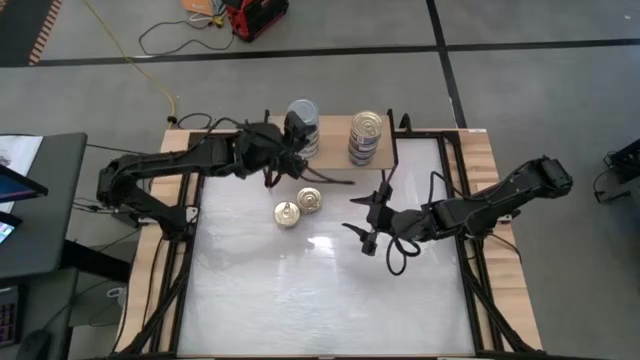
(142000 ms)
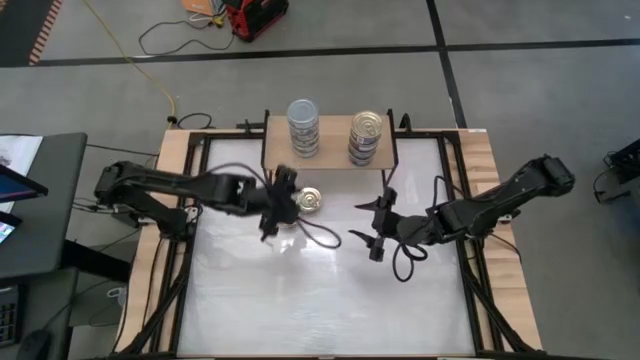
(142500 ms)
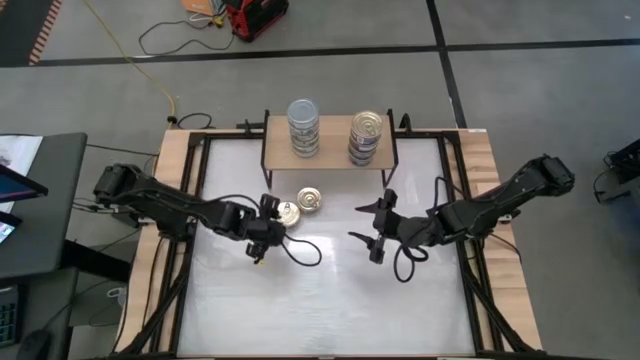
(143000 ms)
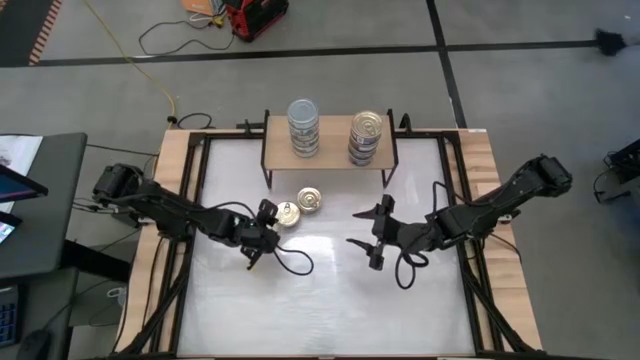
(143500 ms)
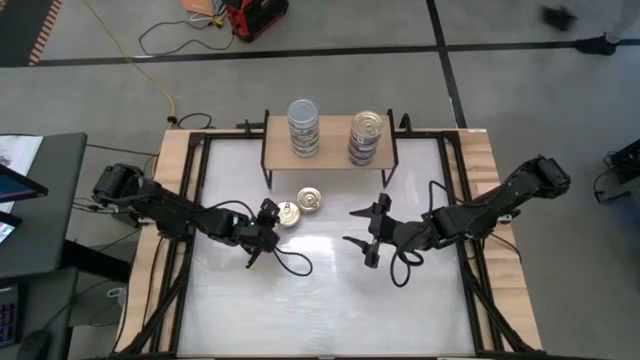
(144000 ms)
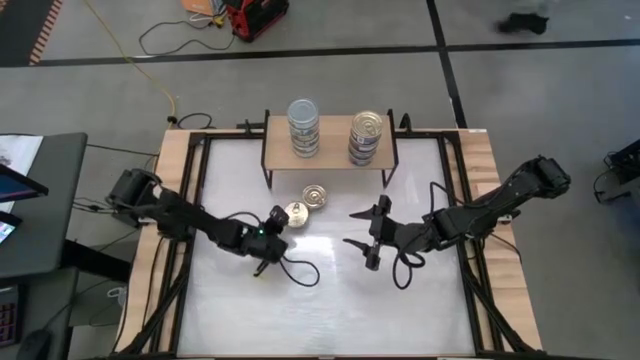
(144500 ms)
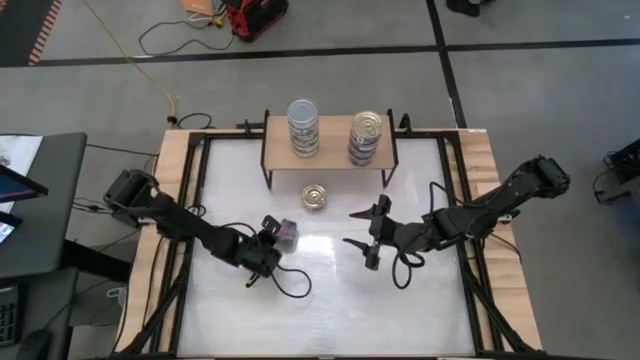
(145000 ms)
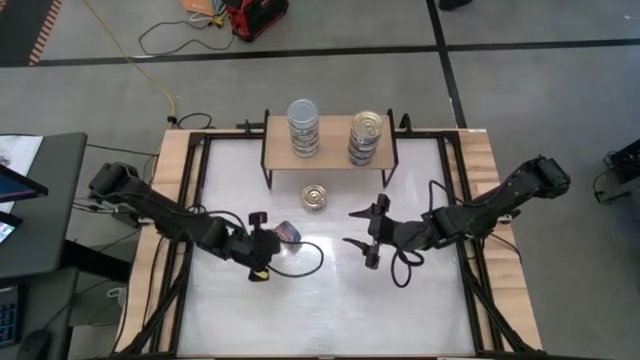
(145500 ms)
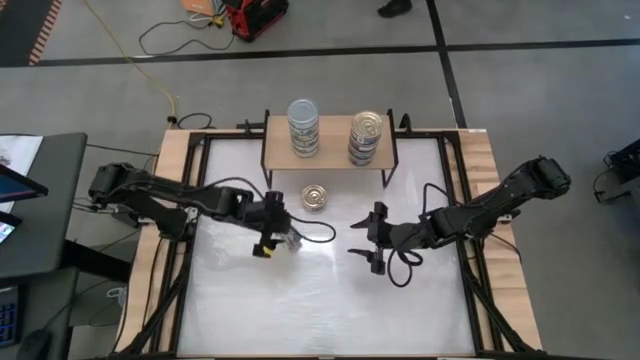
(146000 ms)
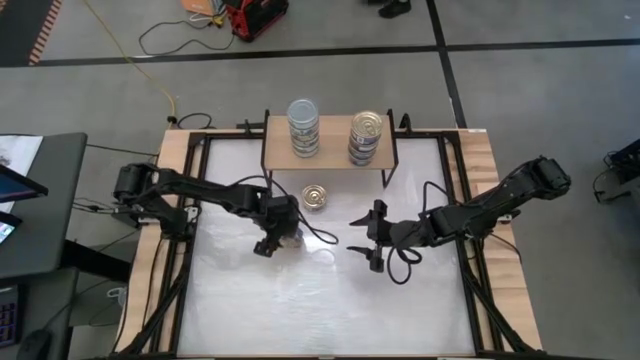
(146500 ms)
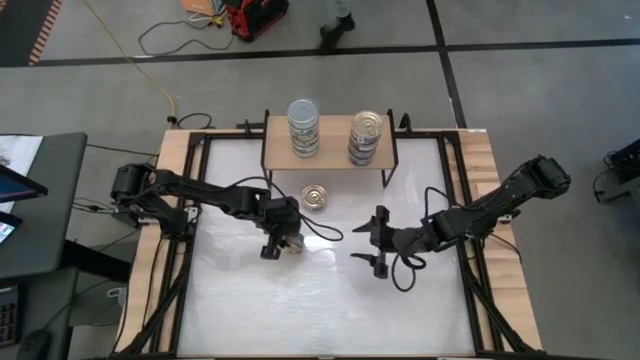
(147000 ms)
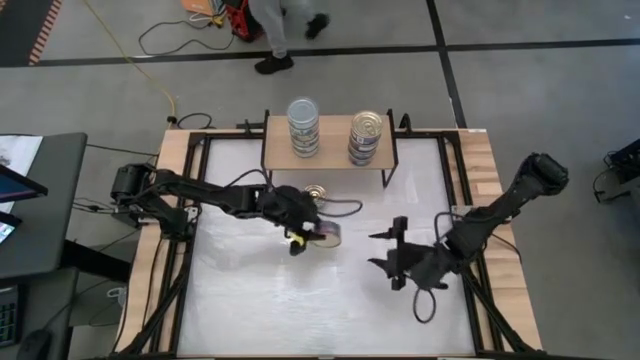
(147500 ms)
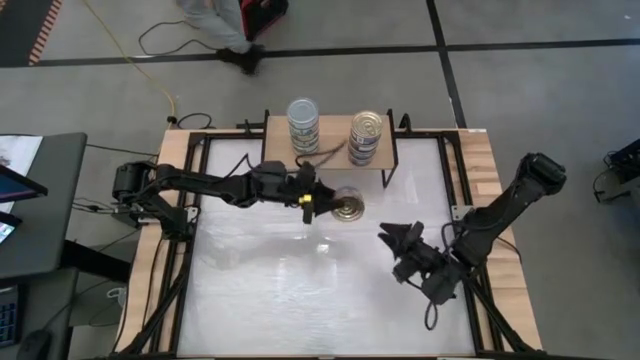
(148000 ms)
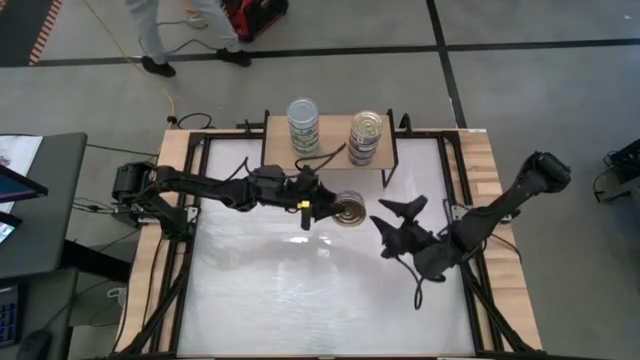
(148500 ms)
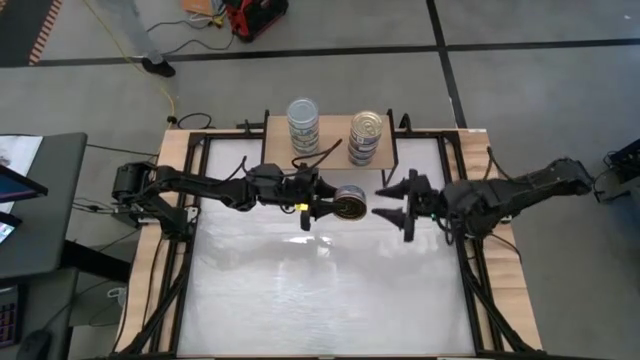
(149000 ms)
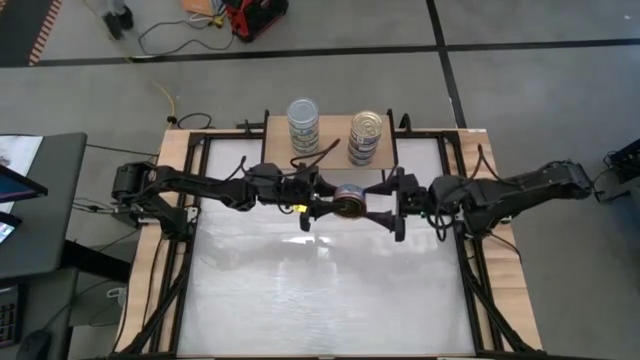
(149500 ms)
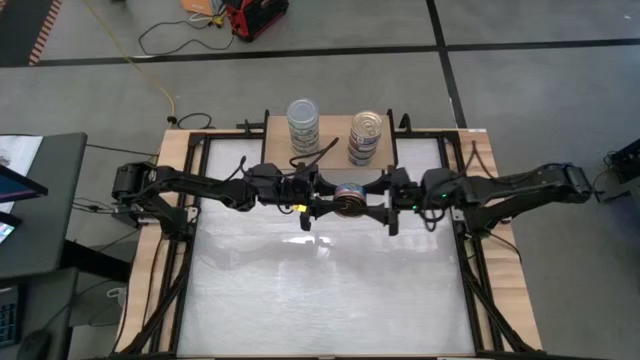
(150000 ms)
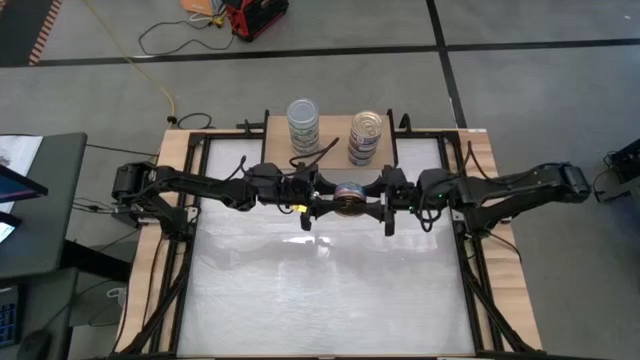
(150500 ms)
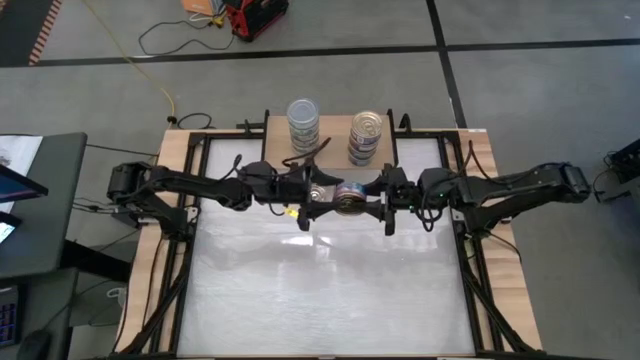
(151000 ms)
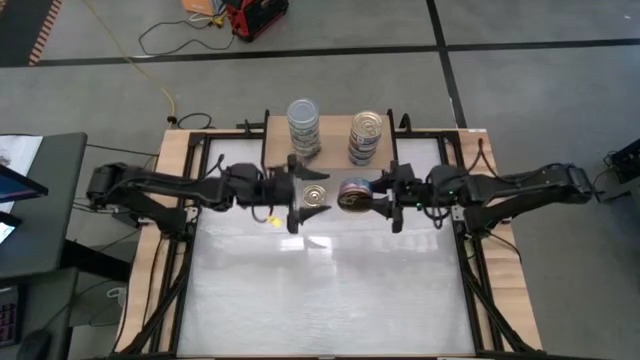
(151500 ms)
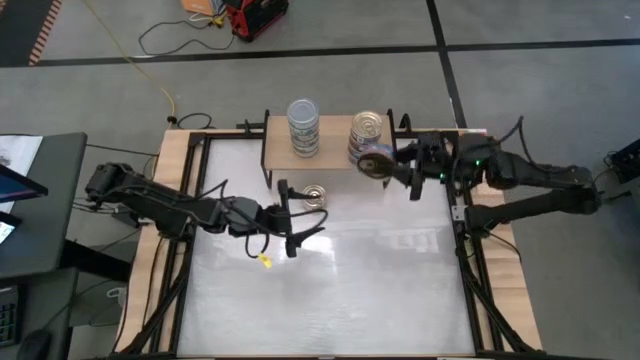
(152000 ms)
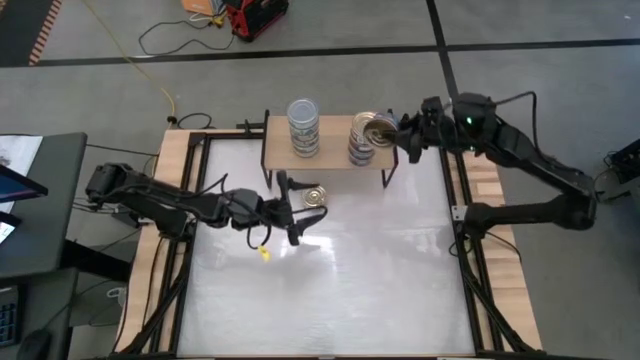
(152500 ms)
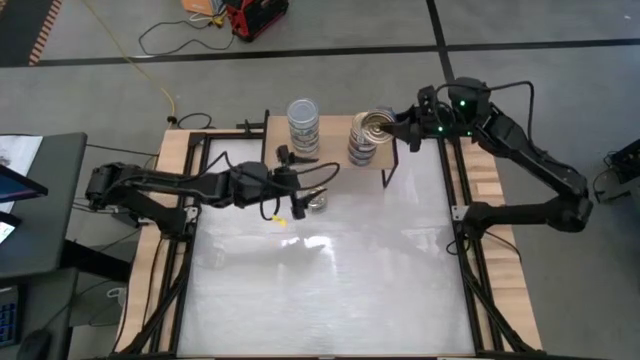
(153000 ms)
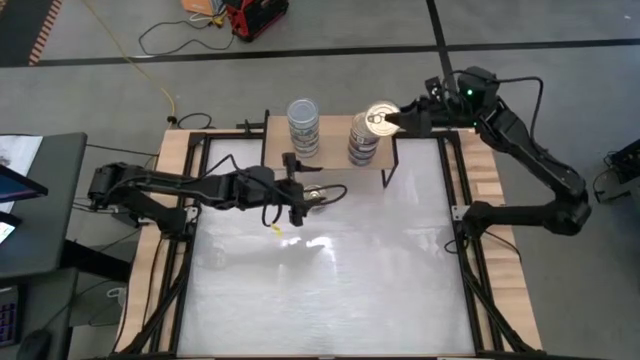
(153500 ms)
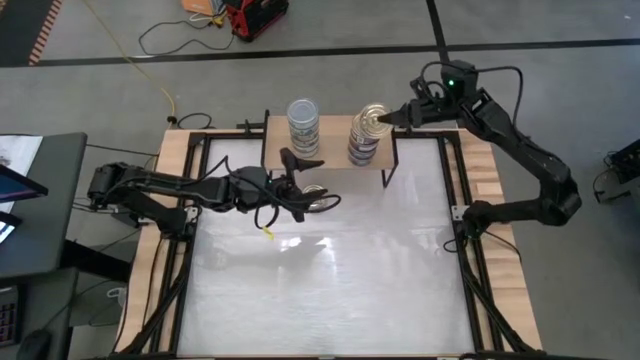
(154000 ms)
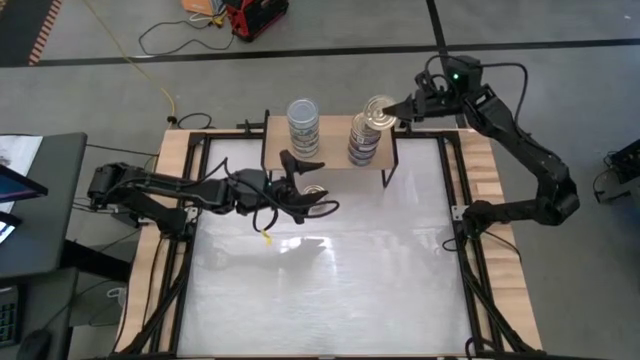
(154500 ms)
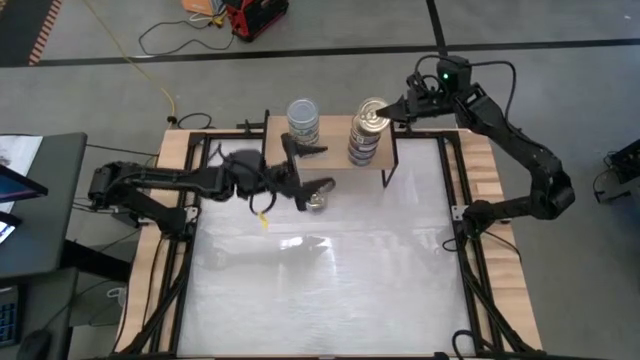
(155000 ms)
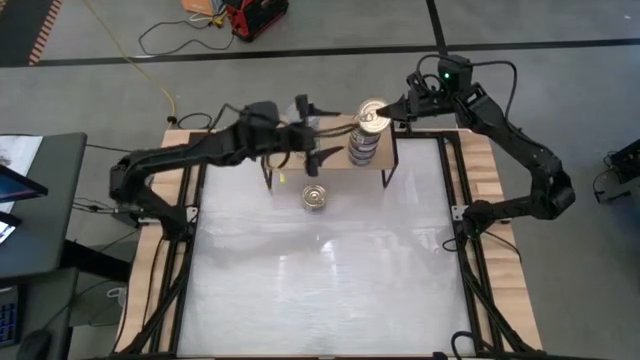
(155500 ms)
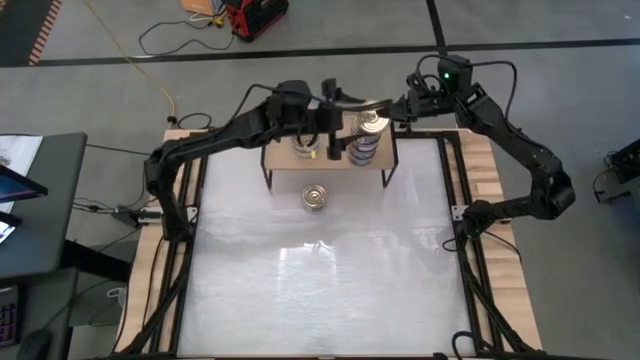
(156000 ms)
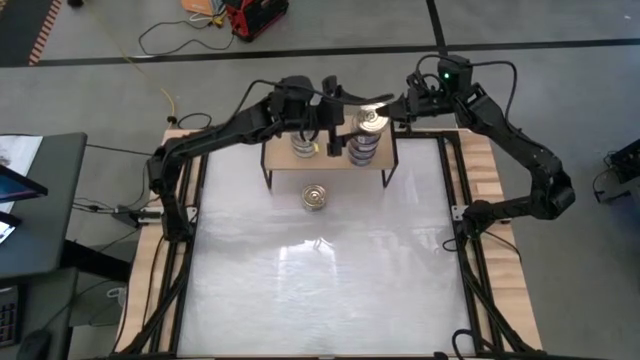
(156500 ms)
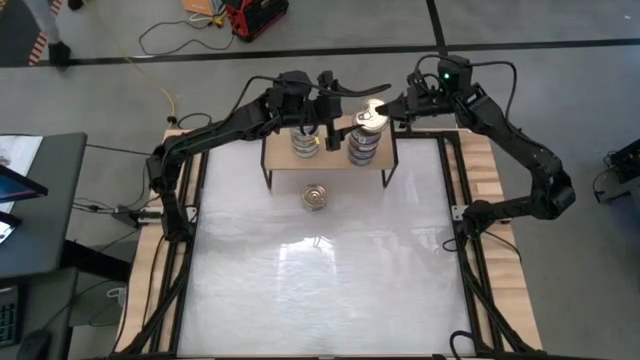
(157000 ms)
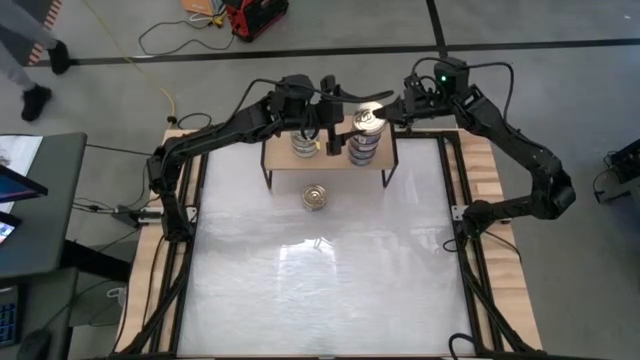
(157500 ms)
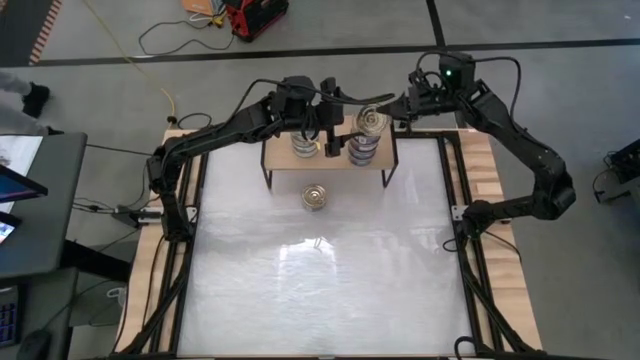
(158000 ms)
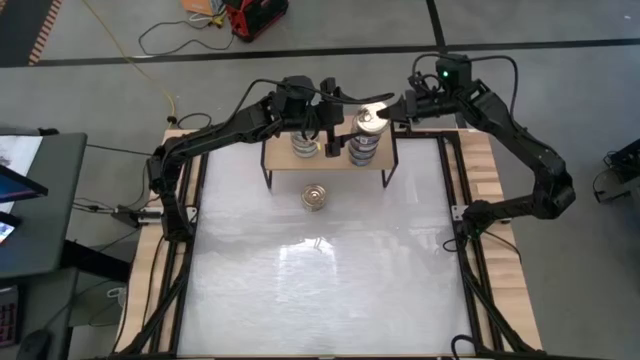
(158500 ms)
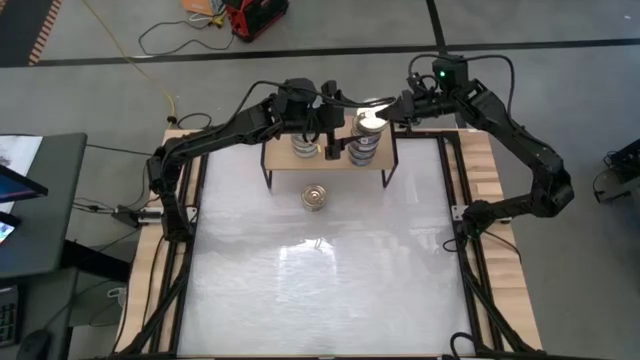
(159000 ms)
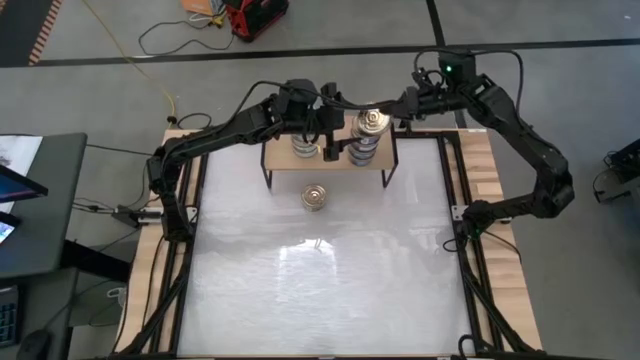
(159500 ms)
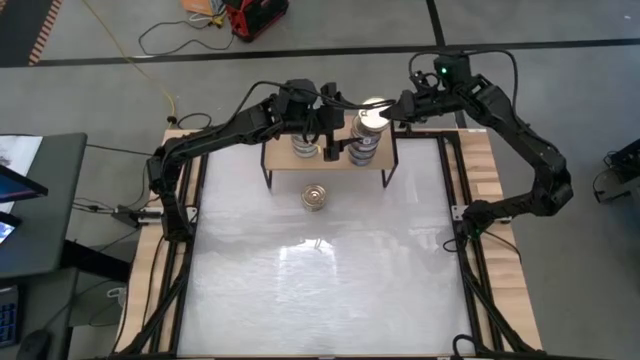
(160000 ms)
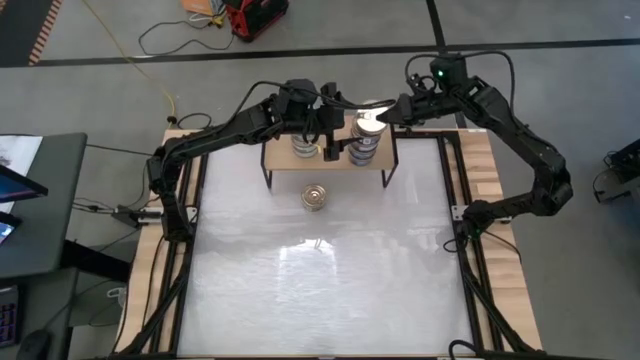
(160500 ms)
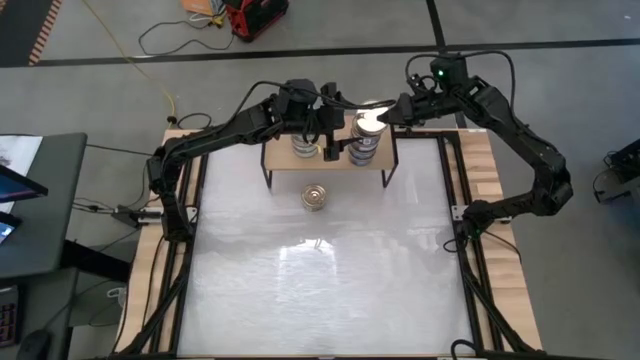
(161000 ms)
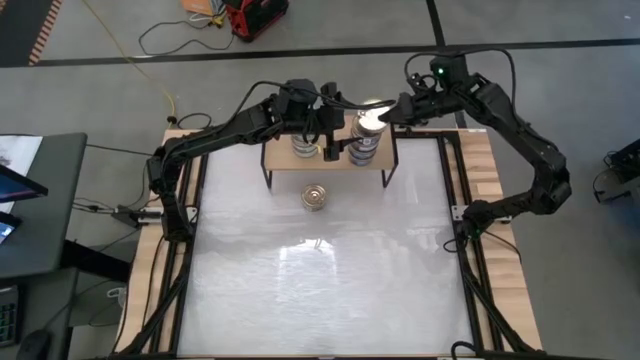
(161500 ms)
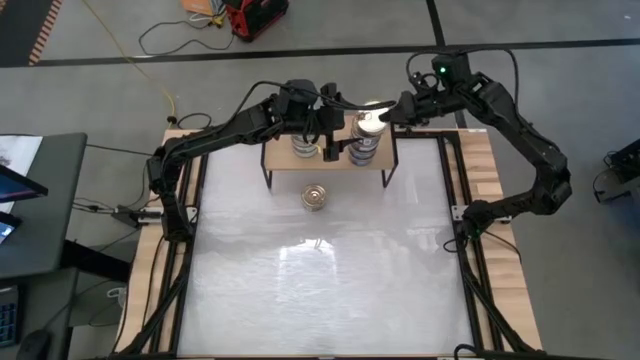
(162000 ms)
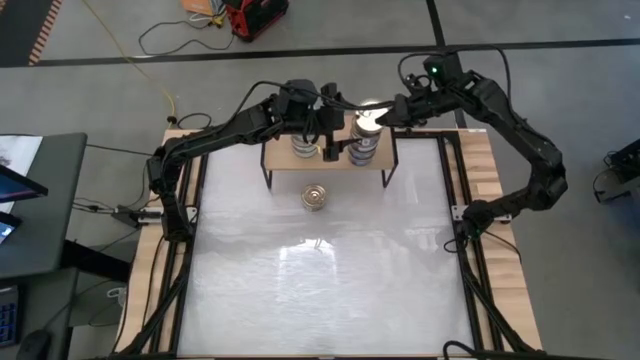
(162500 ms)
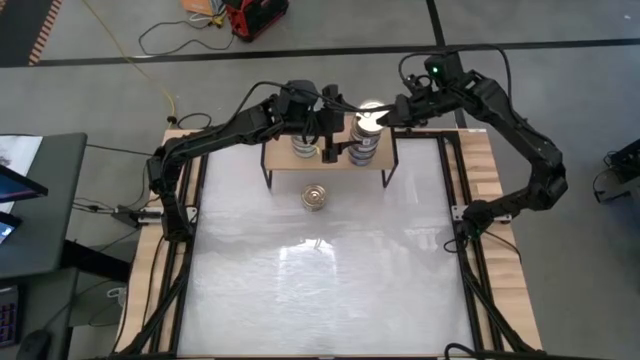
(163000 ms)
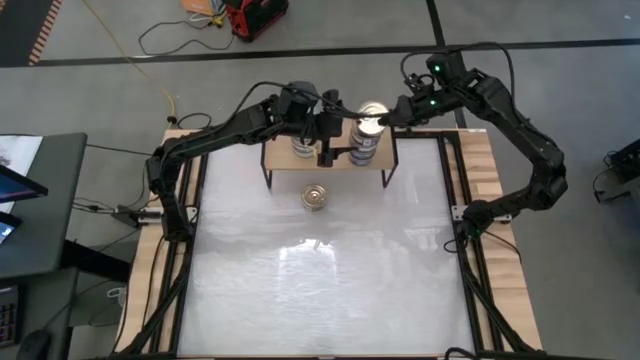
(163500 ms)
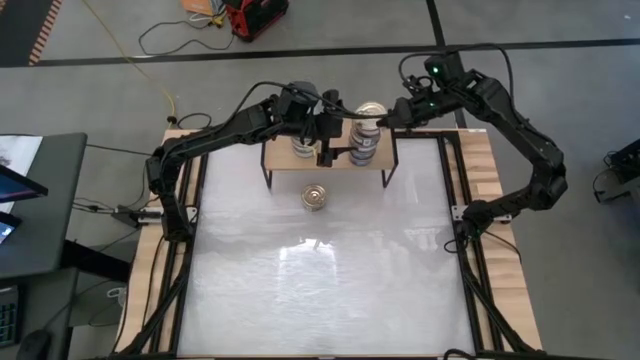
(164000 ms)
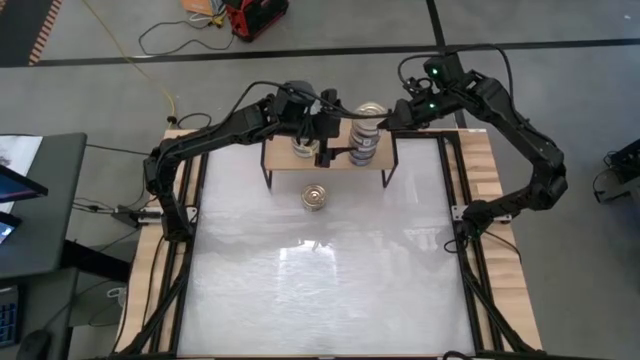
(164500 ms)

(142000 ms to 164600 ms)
Task: Stack canned seafood by type on shelf
Stack the blue pink tuna can on top of the other blue pink tuna cans on the shelf
